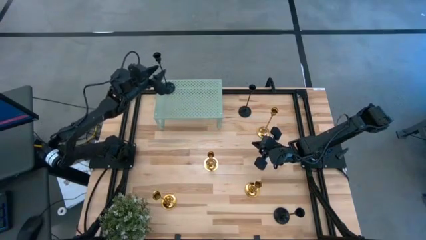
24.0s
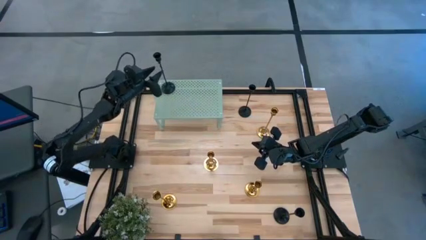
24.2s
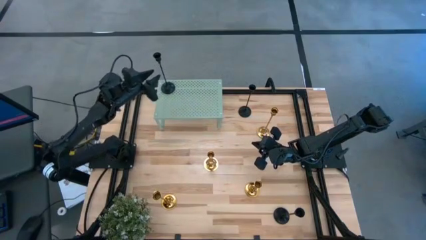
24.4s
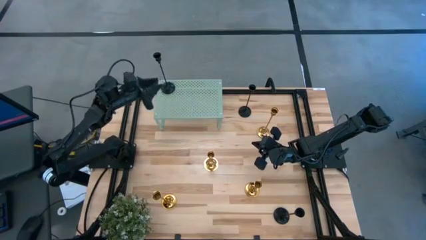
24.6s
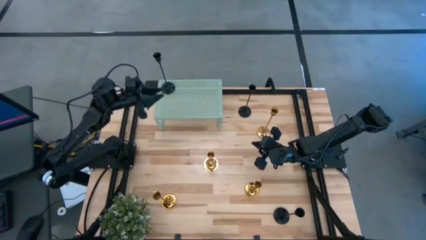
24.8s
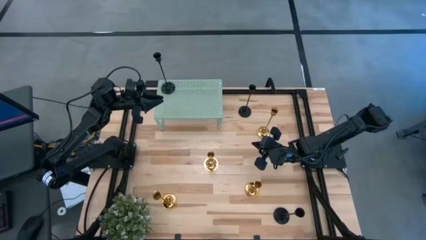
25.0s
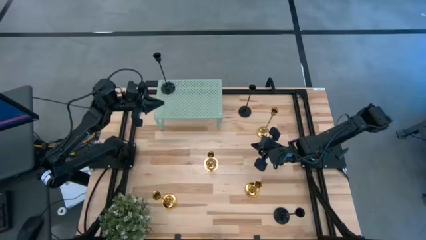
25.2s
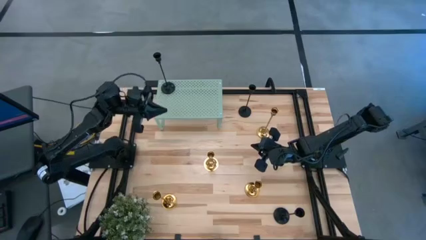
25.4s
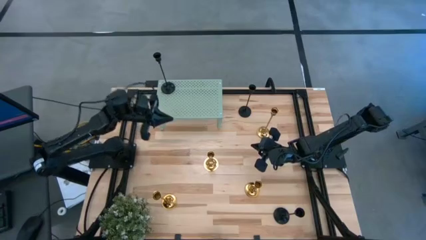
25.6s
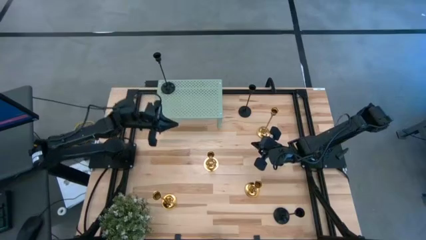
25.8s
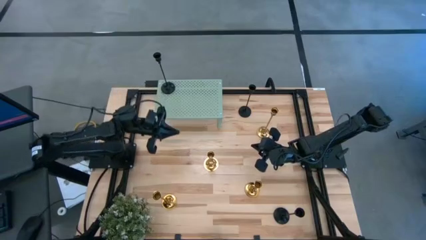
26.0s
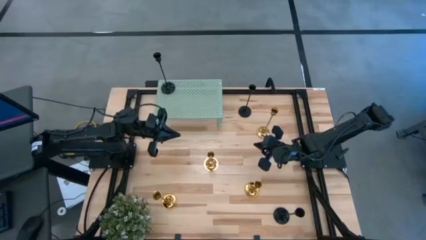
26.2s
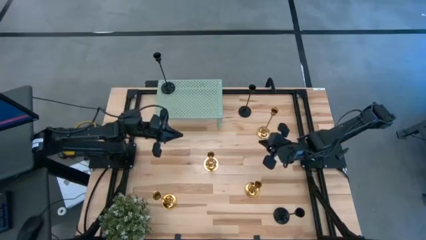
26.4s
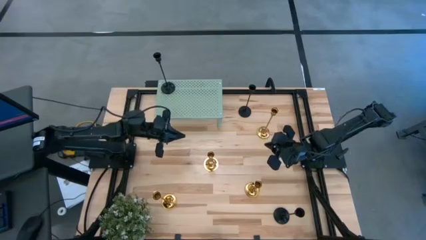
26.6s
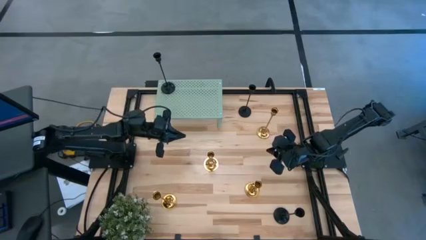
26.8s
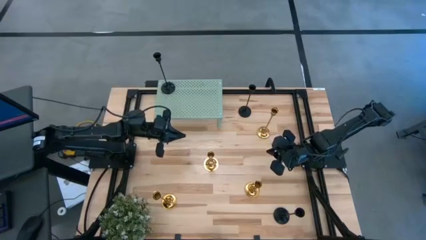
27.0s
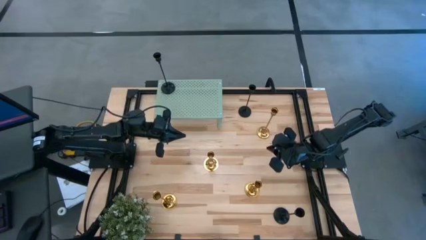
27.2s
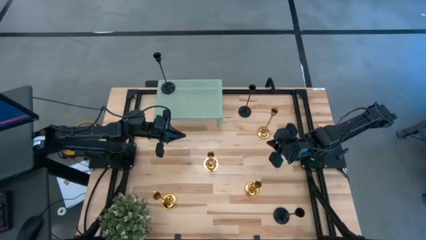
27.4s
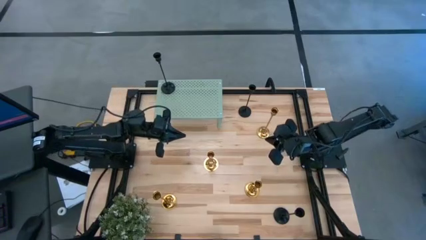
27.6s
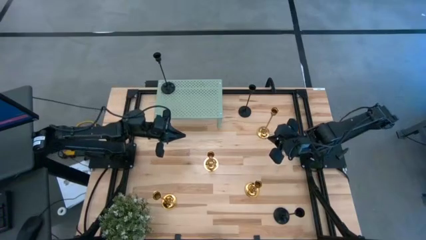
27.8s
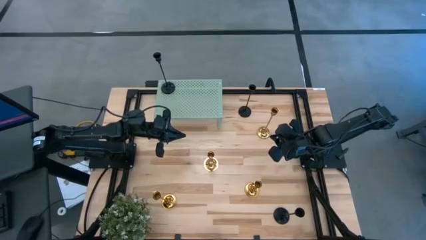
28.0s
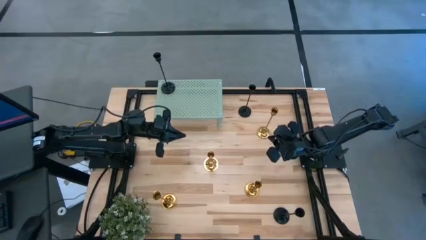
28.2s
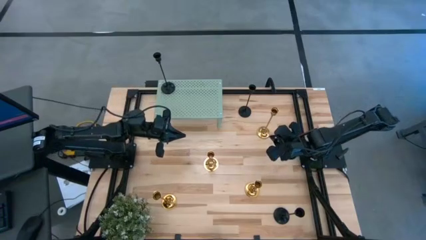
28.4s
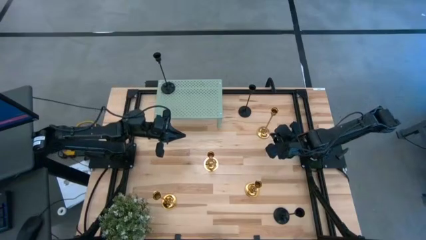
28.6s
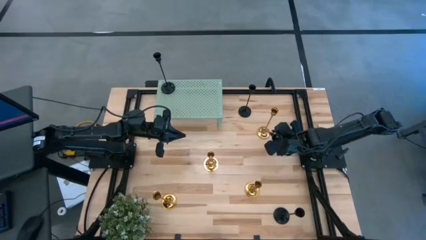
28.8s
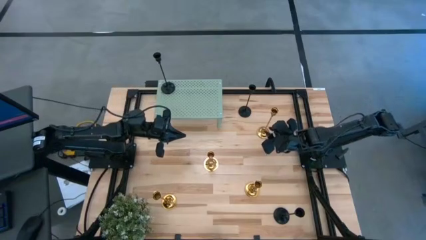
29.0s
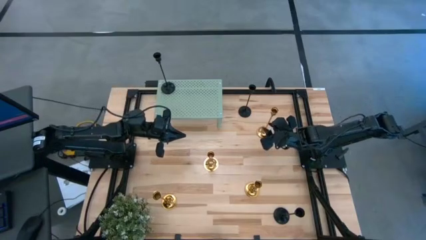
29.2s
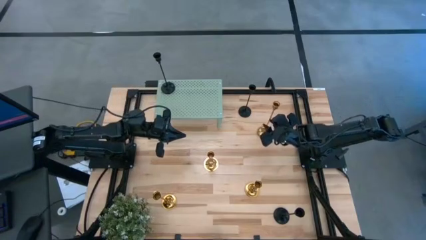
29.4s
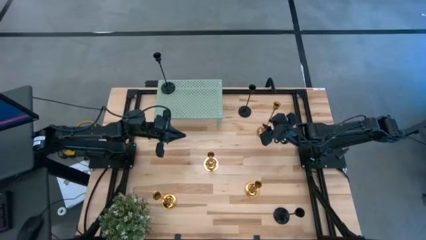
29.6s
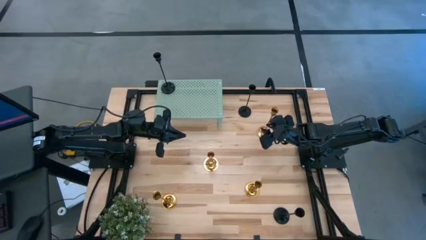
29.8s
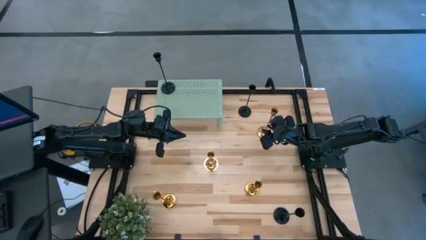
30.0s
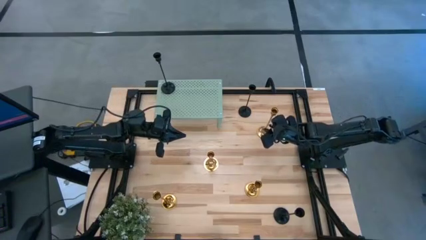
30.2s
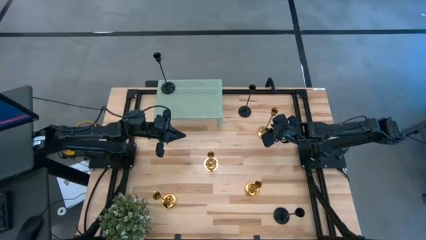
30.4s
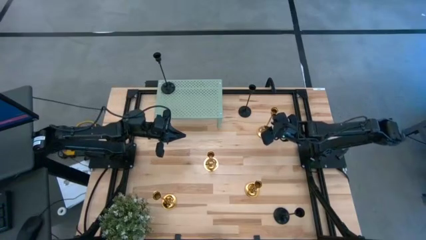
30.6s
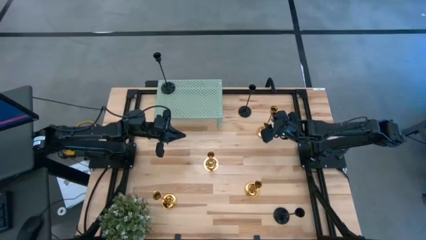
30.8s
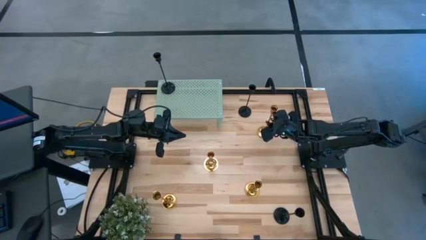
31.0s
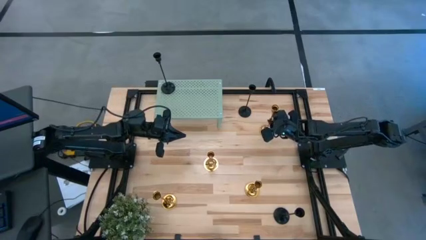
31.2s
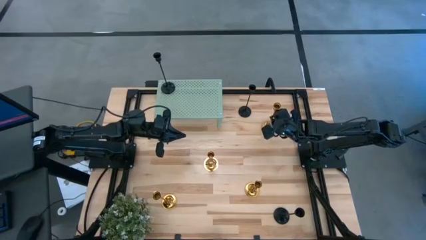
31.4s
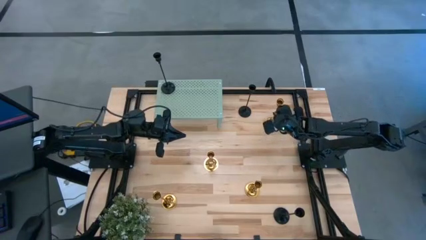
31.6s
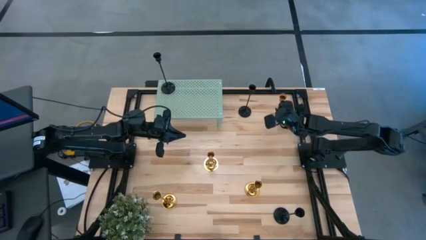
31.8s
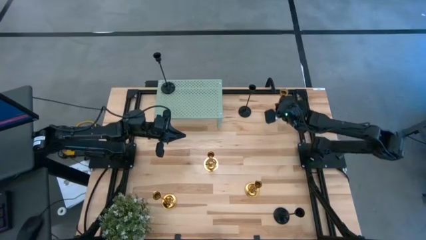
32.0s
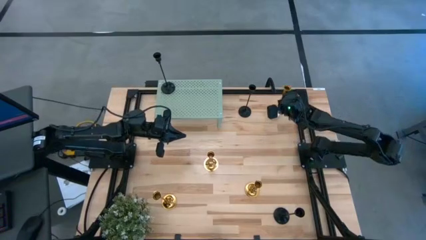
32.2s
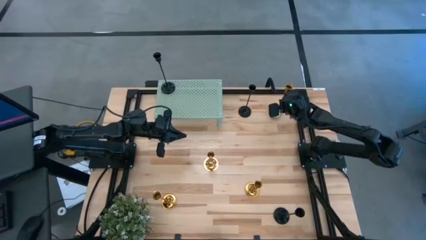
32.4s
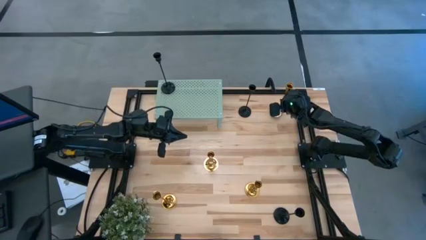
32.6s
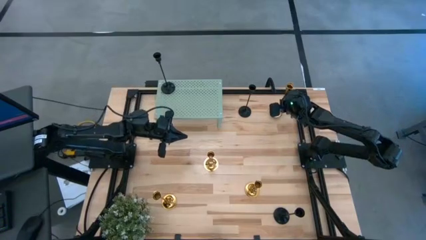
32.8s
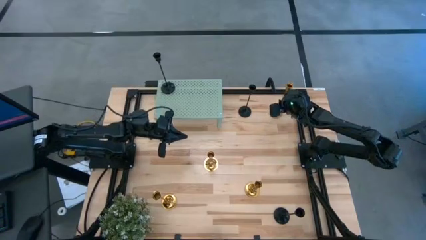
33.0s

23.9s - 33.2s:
Task: Pick & Place candle stick holders
Adjust the gold candle holder

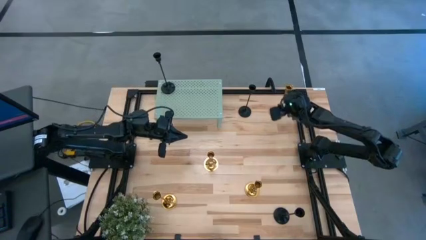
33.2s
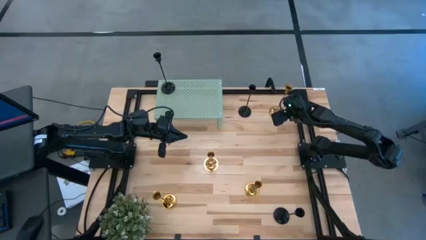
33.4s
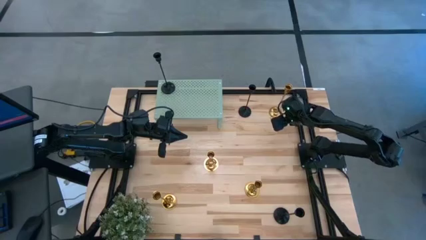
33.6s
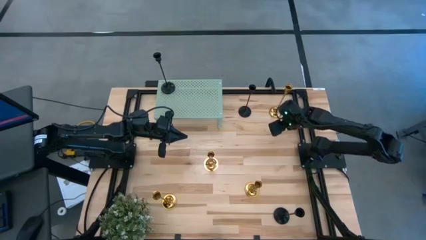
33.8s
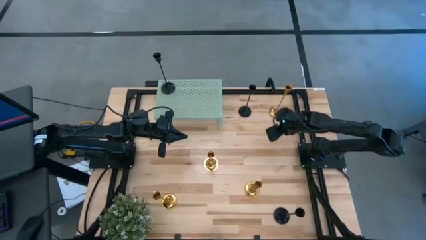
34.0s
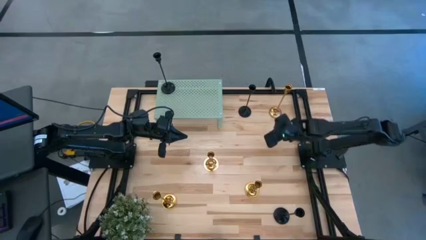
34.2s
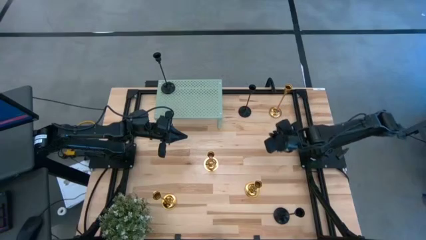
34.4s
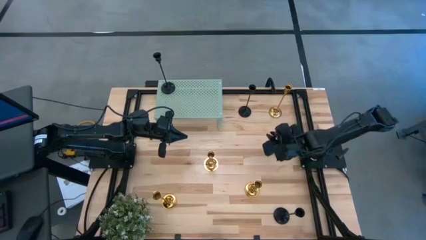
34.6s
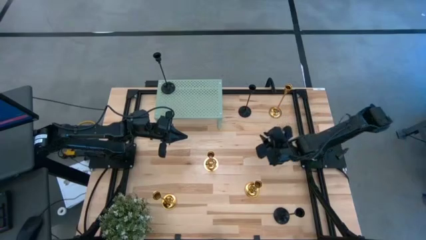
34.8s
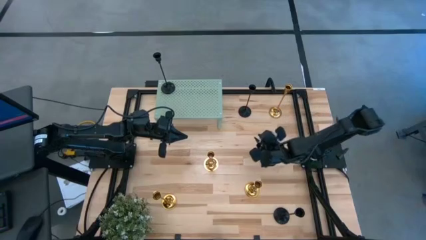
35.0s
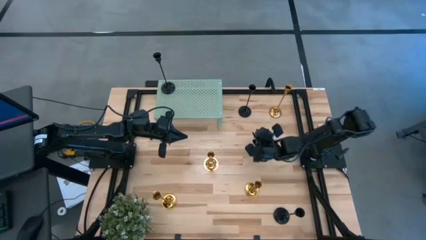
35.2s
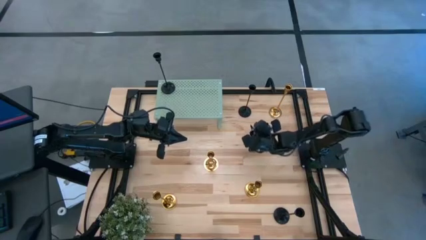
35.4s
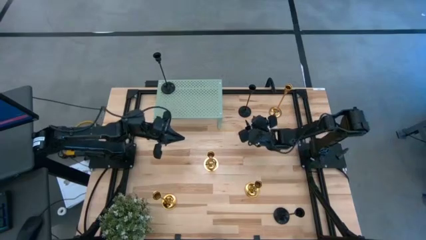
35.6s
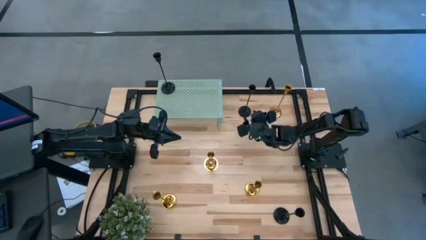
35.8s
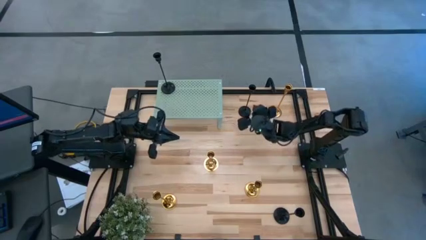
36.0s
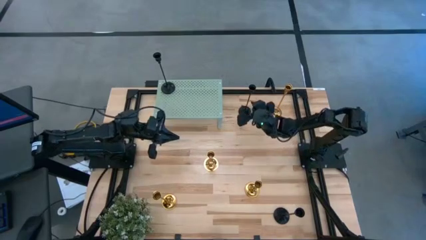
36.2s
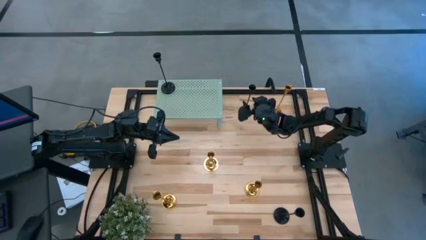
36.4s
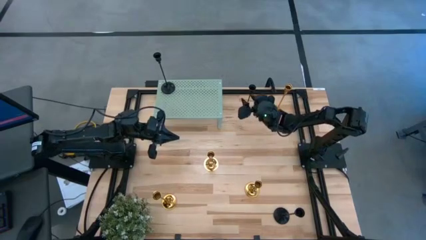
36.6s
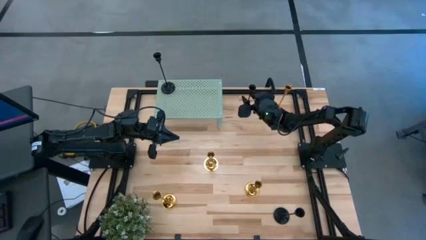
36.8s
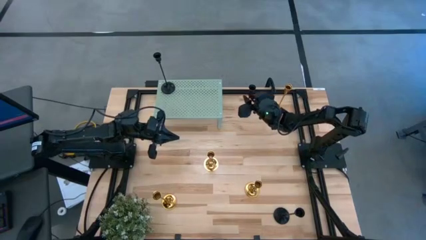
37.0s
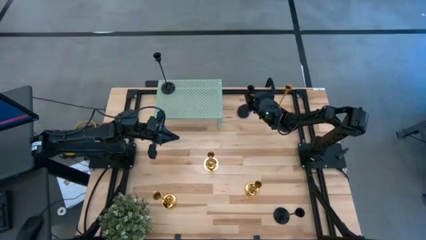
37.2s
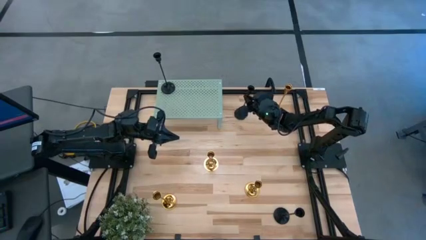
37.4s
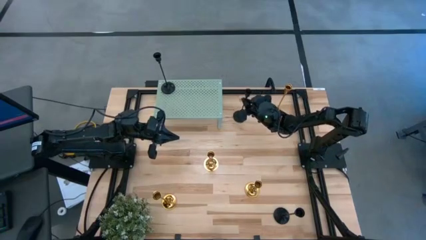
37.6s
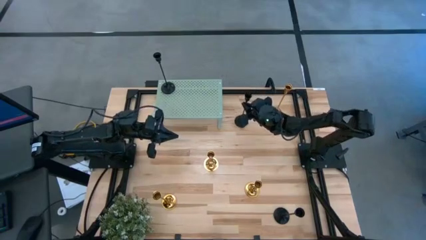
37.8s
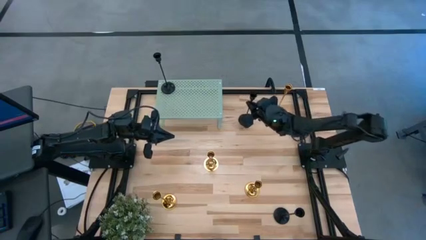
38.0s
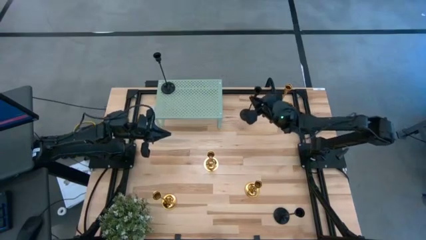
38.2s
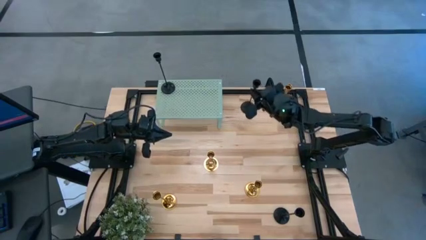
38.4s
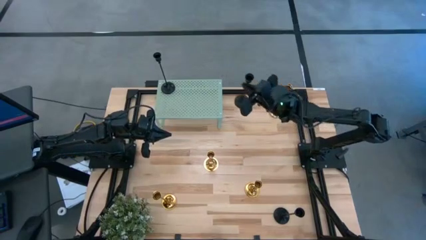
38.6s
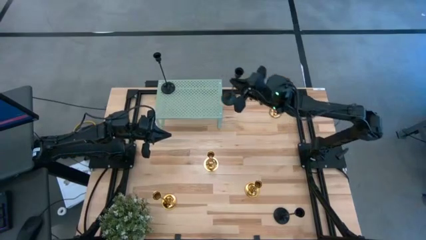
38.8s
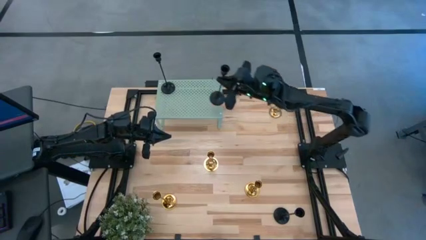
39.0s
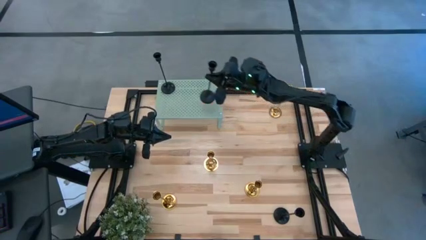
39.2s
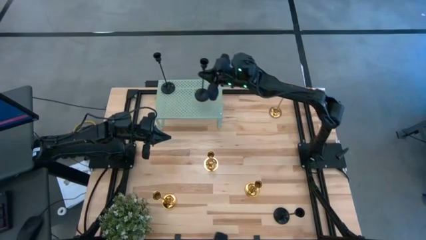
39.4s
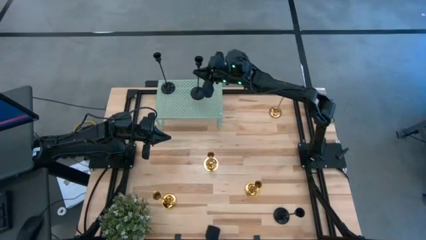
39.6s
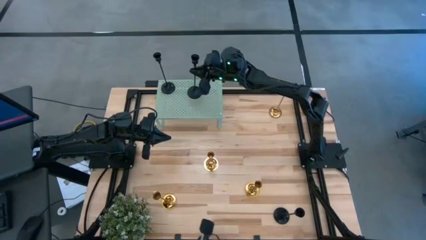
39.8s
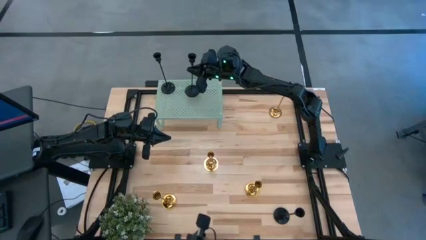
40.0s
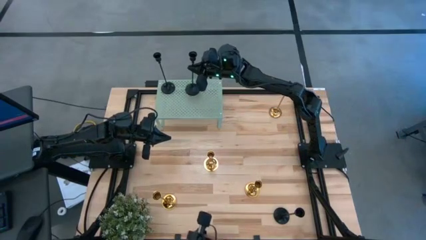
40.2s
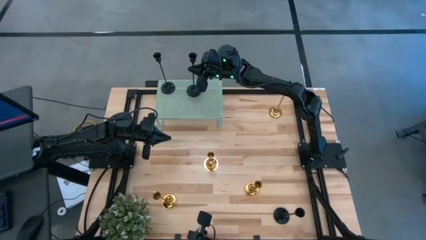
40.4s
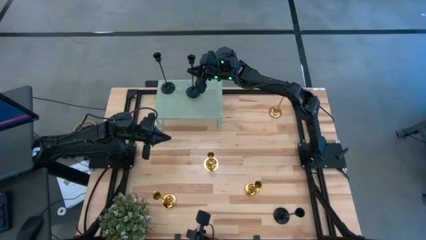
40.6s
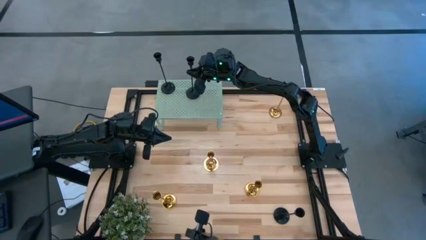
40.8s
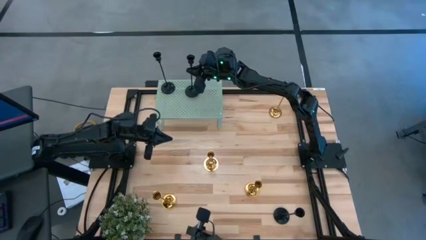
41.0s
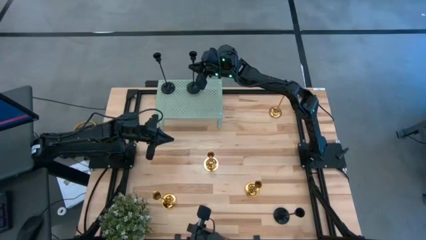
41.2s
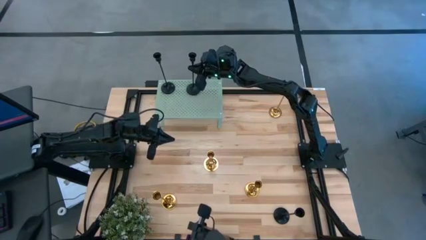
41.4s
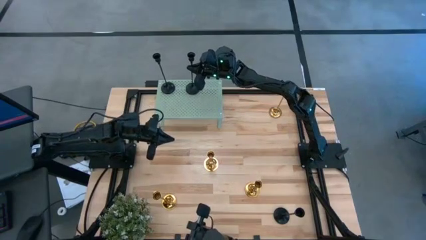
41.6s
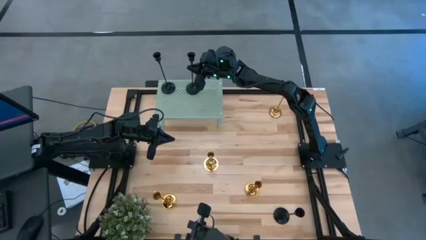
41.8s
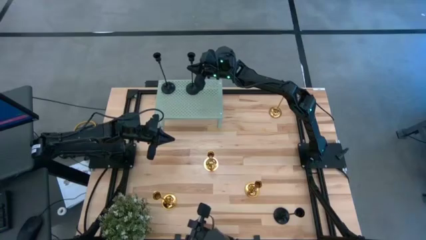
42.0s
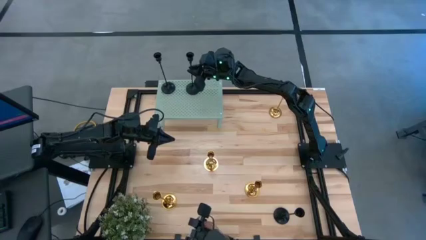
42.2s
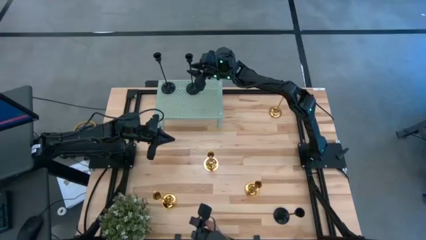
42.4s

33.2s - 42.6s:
Put the black candle holder on the shelf
